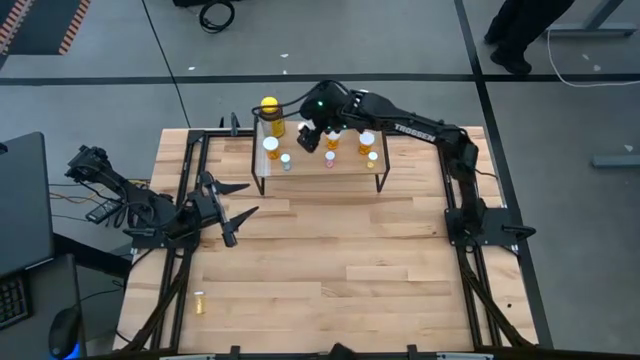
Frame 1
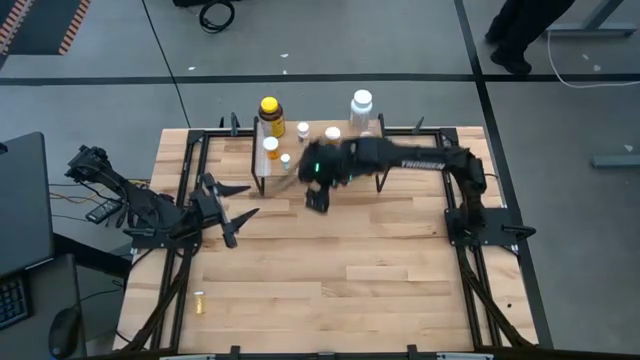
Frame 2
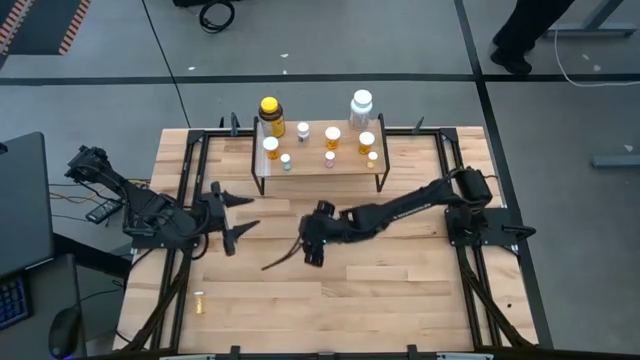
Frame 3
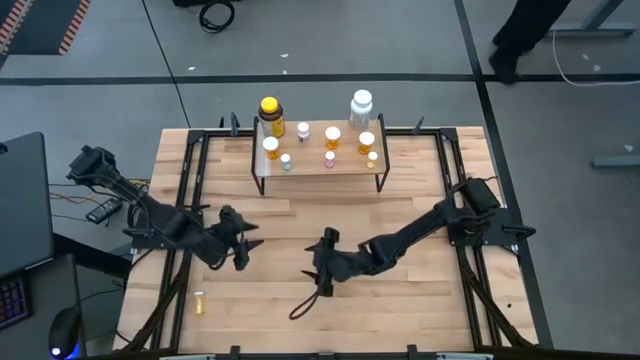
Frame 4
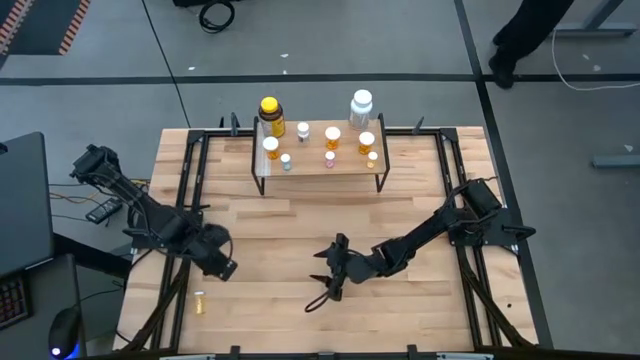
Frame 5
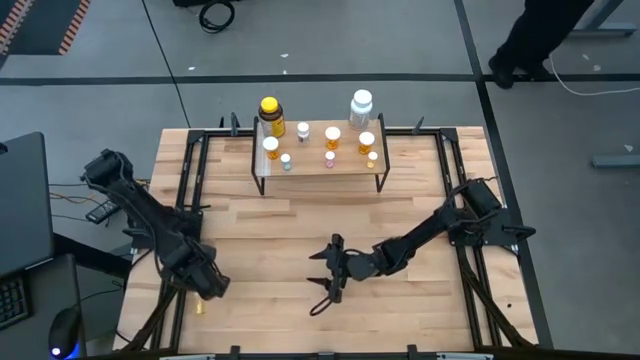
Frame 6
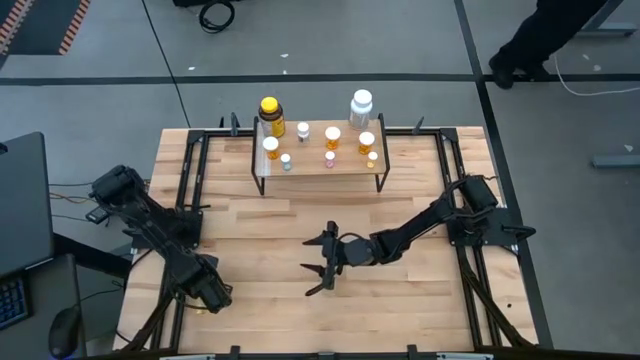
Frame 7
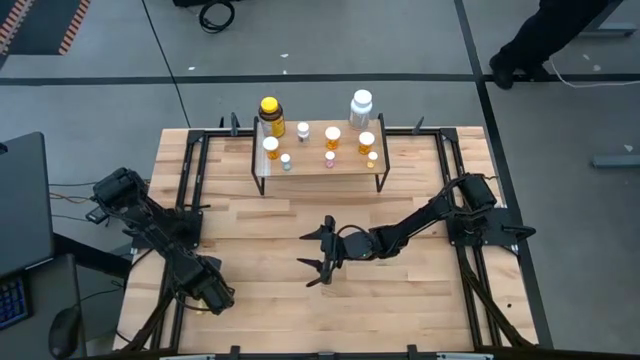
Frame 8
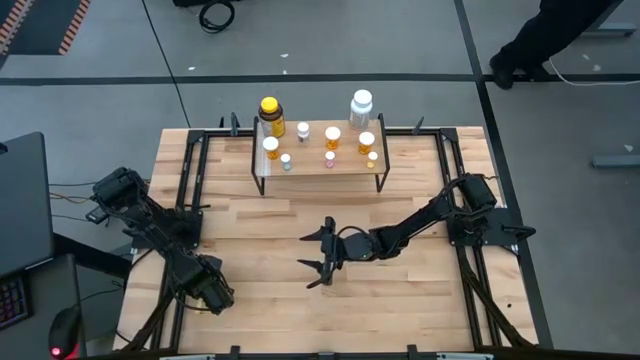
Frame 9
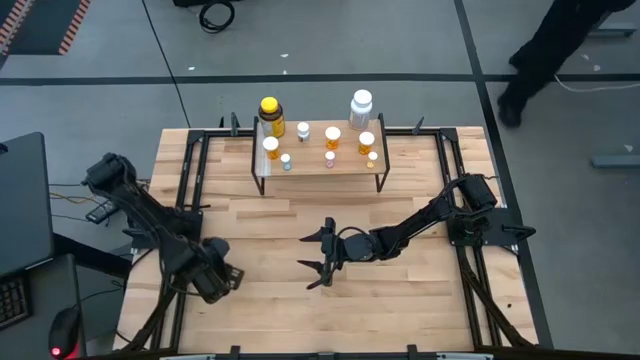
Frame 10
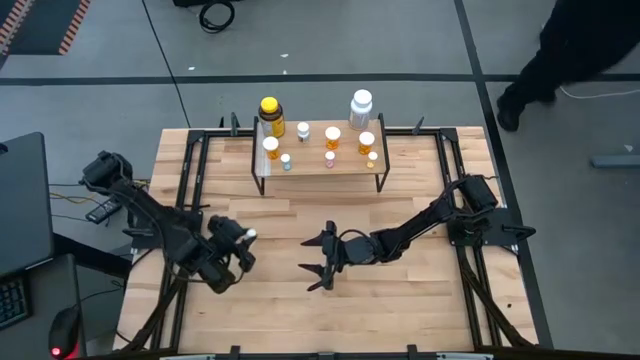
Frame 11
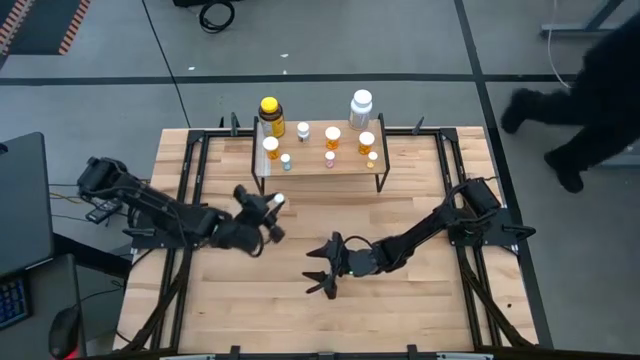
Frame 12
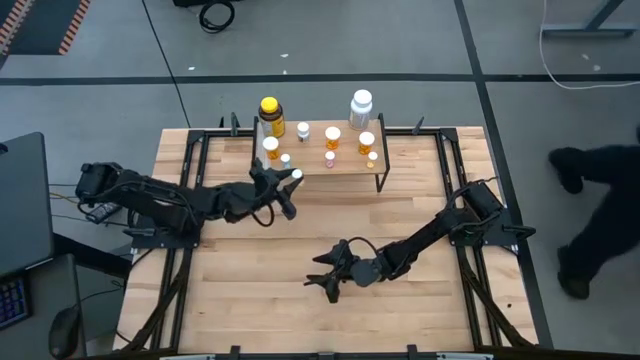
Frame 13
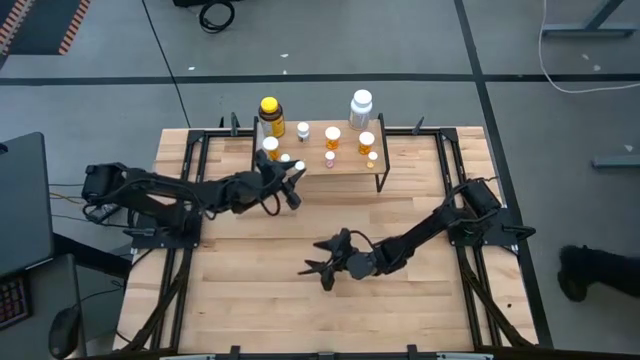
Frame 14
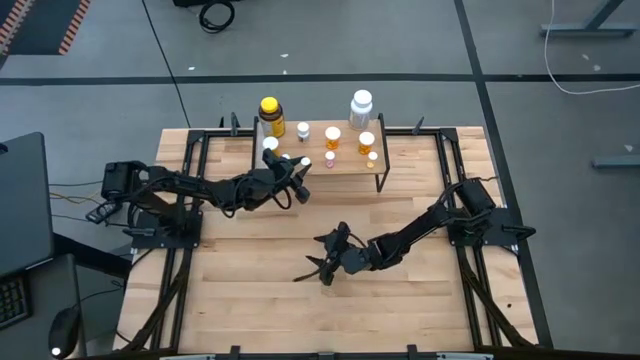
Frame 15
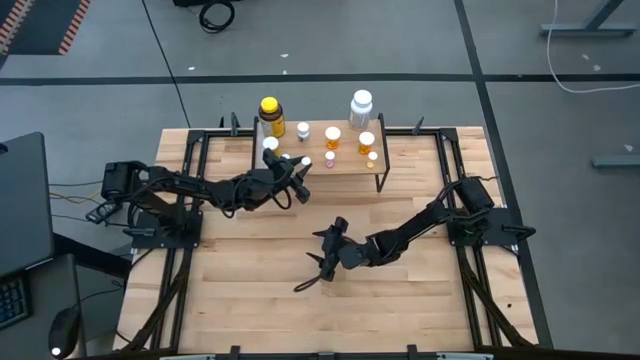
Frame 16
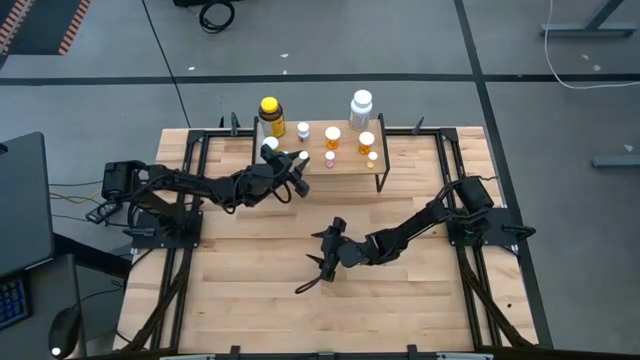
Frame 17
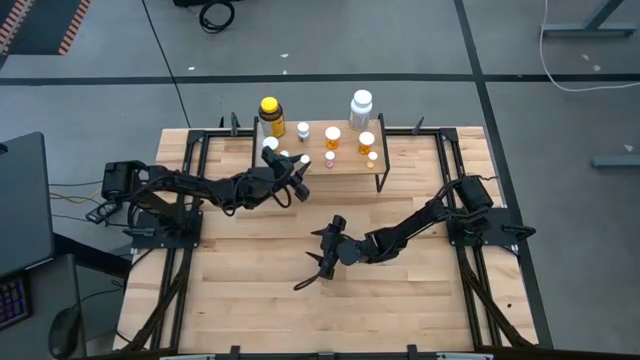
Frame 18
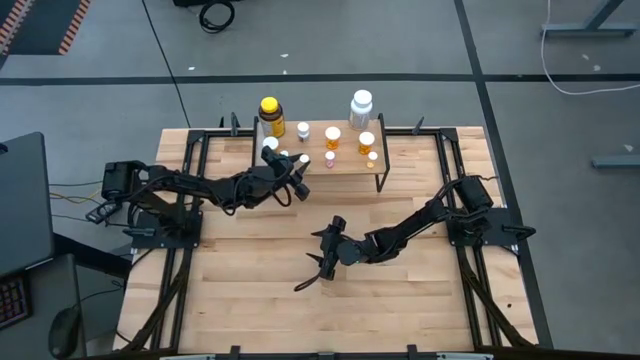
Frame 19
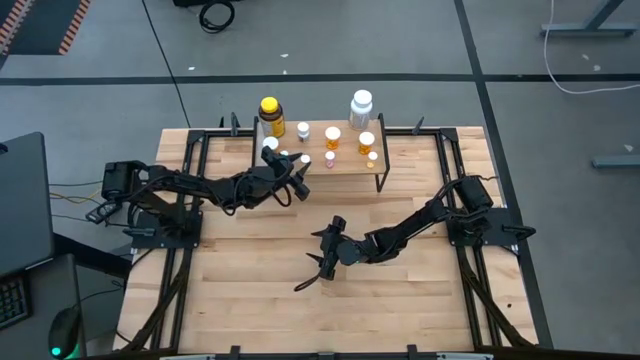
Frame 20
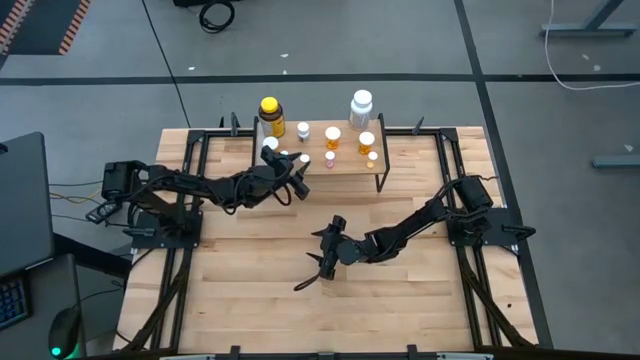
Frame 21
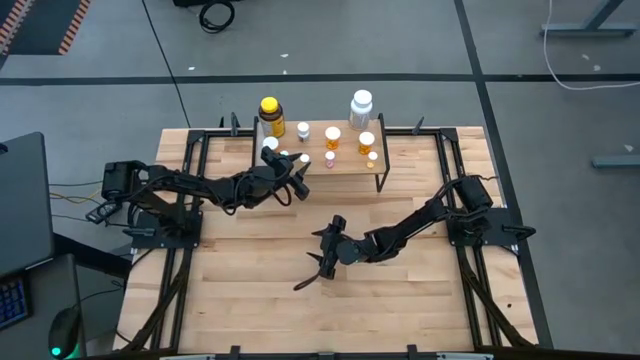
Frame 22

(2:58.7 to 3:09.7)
Task: Pick and place medicine bottles onto shelf by color
Put the yellow pill bottle on the shelf

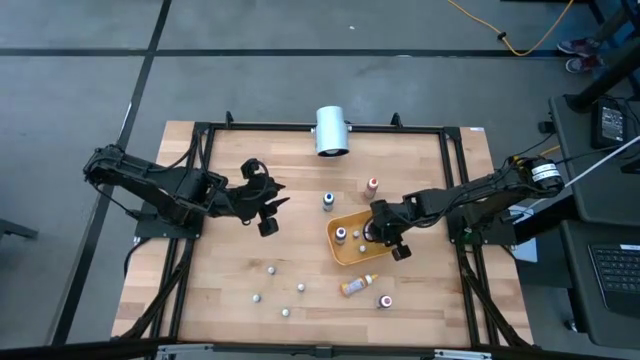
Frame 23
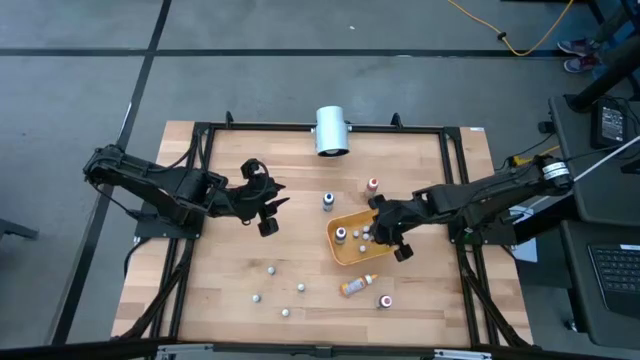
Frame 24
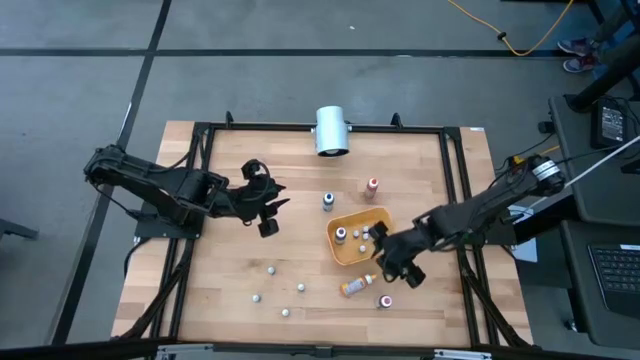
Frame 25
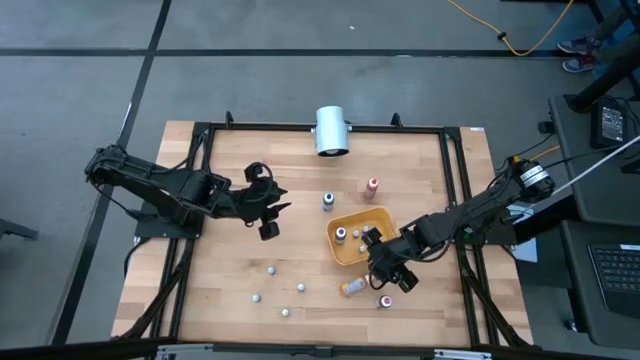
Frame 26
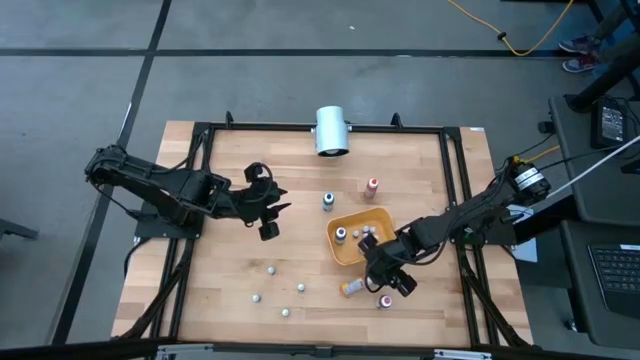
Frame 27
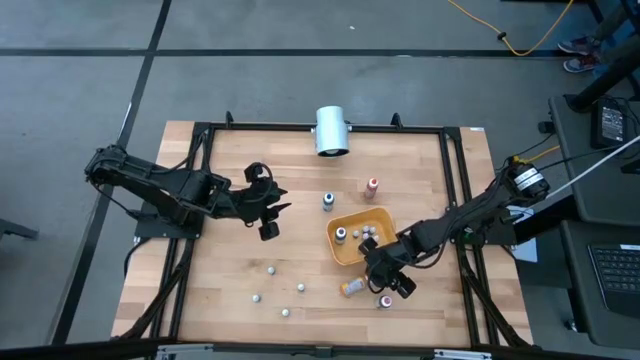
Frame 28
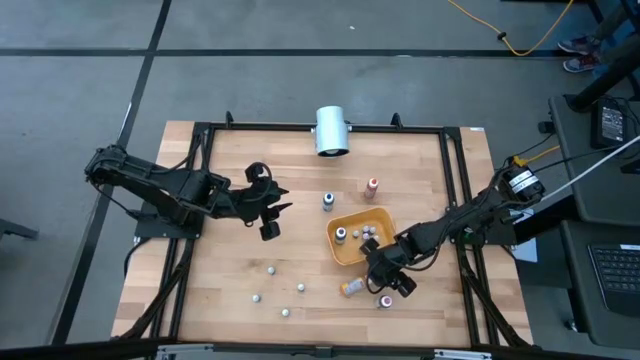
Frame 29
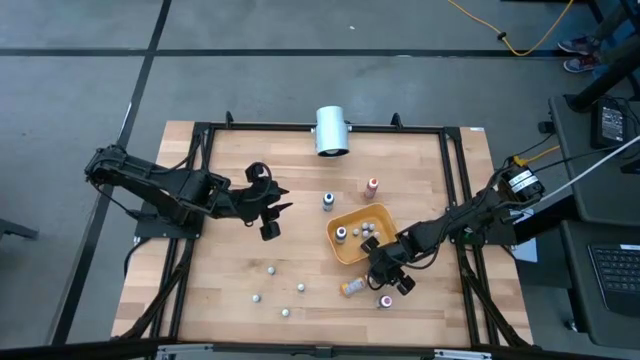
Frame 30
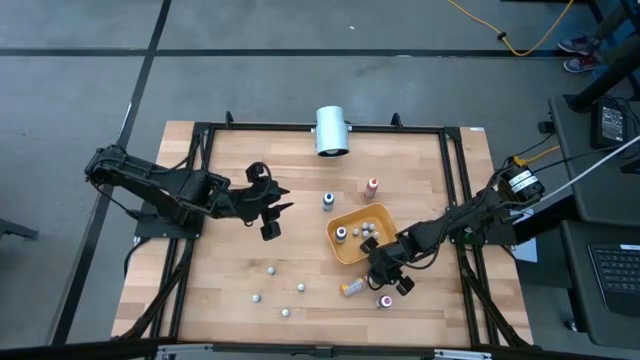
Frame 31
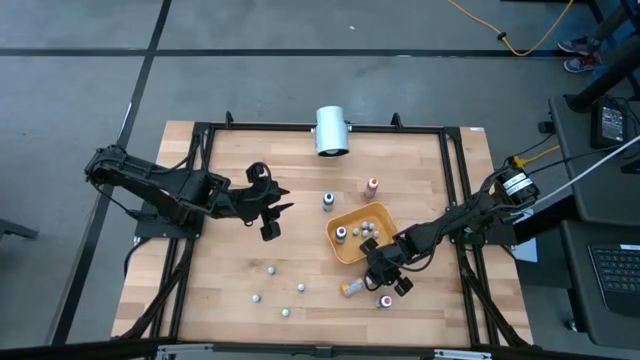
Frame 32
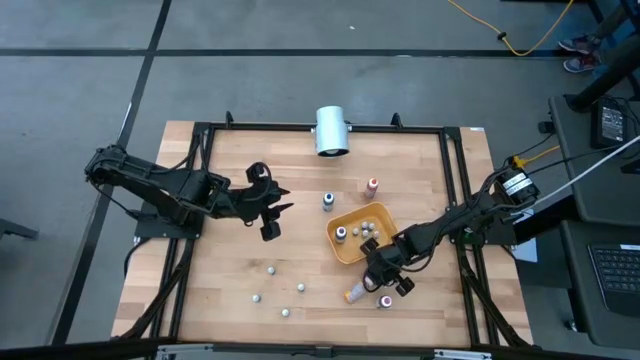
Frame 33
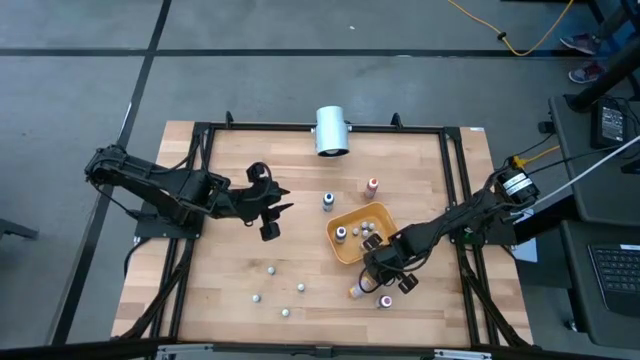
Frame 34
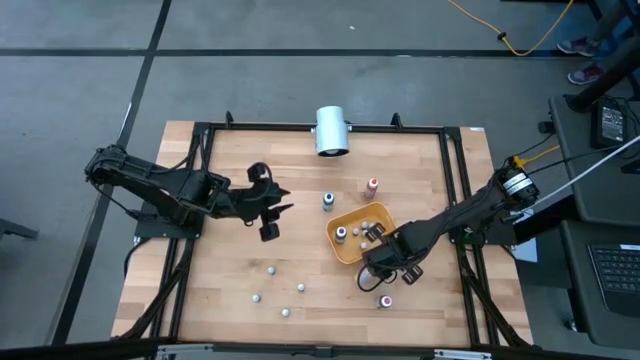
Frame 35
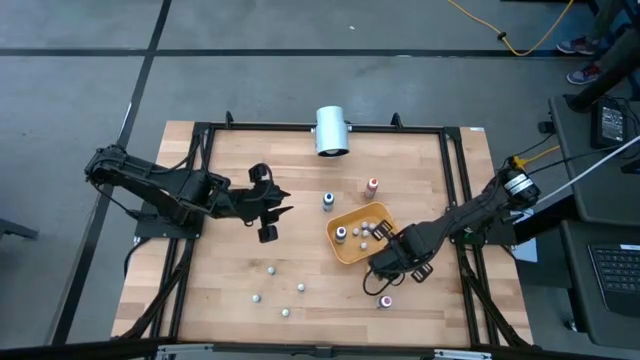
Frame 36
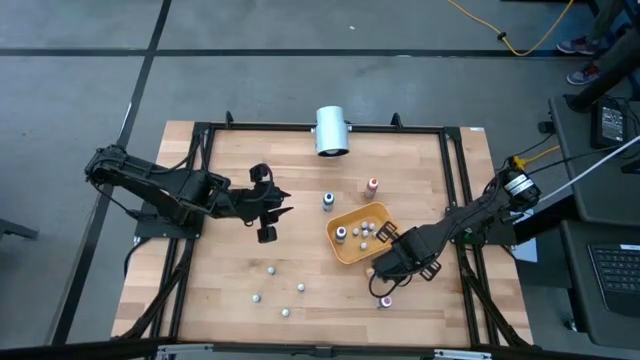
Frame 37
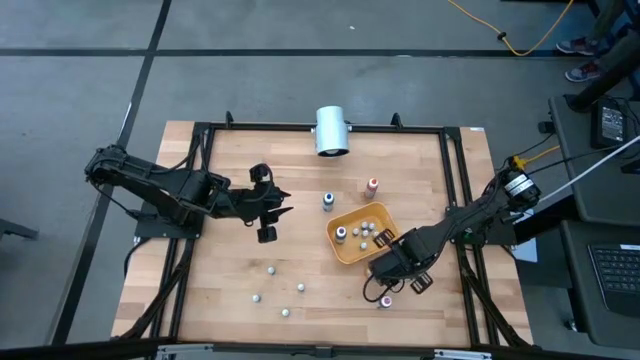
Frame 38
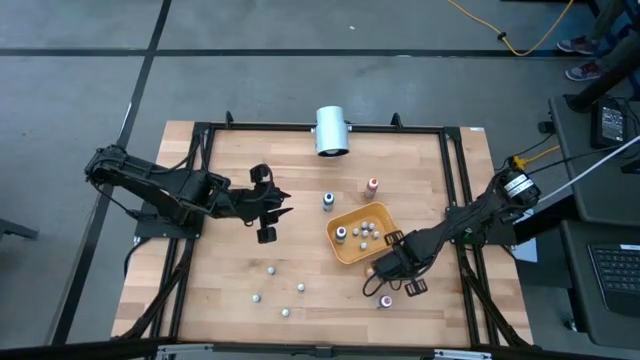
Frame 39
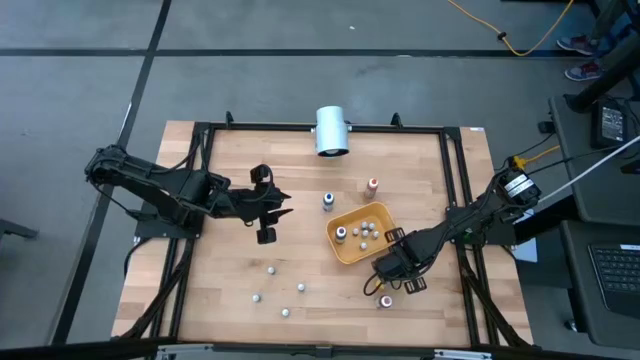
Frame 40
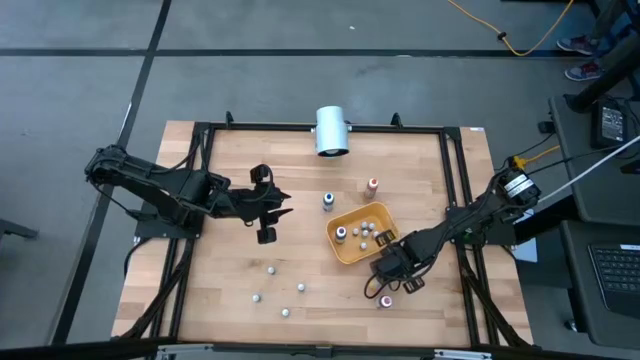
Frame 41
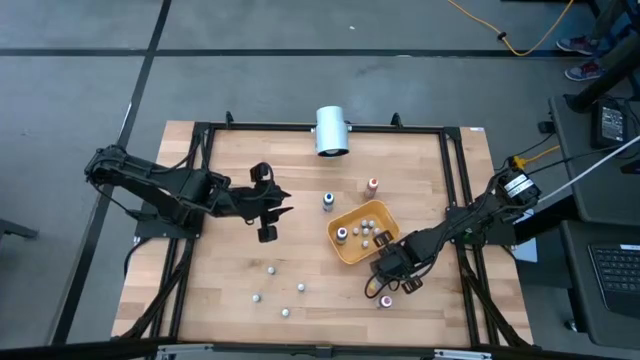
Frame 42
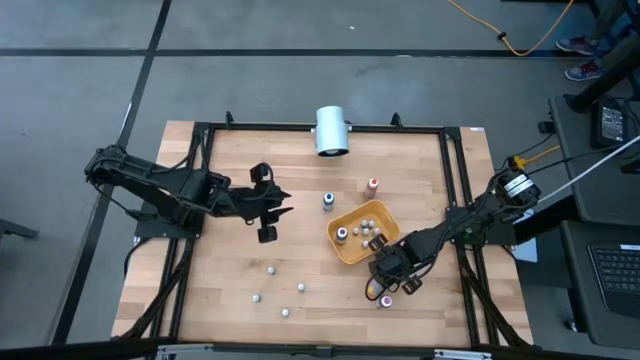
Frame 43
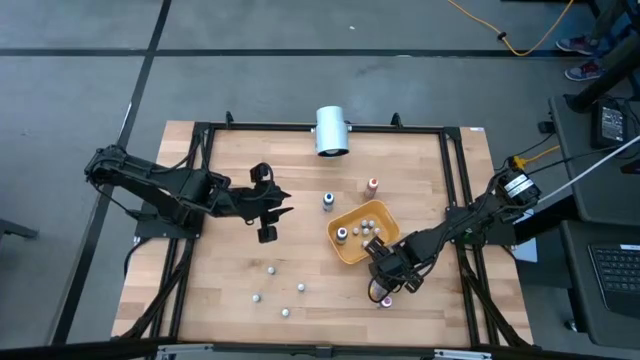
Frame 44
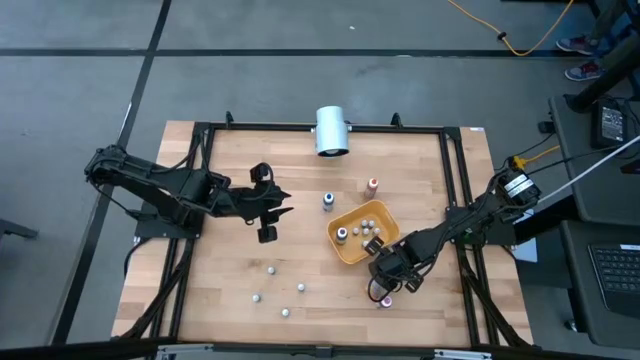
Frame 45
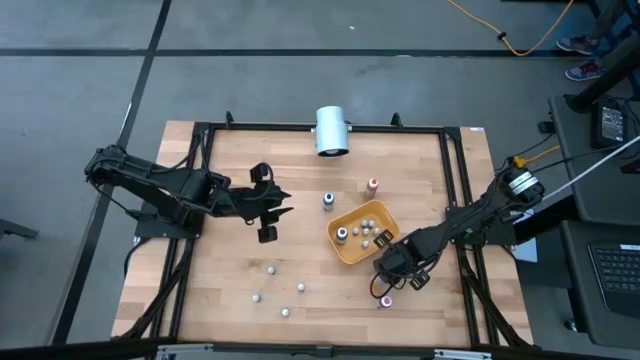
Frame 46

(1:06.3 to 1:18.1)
Task: Pick & Place food coloring
Put the large yellow food coloring bottle into the yellow bin
